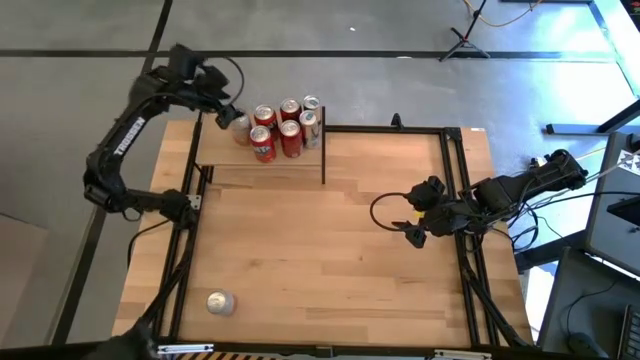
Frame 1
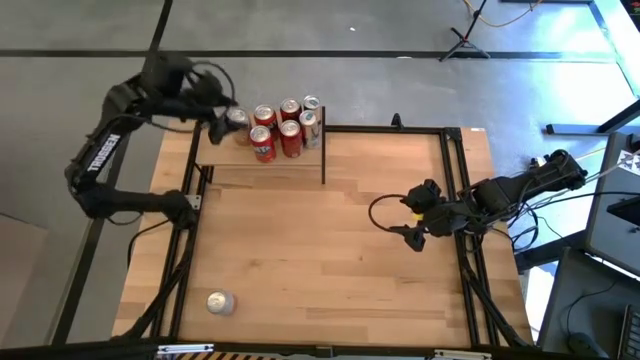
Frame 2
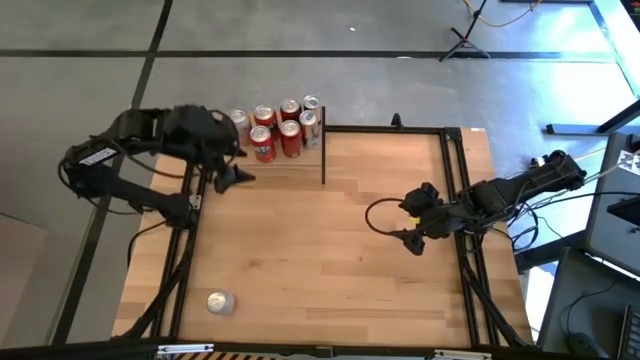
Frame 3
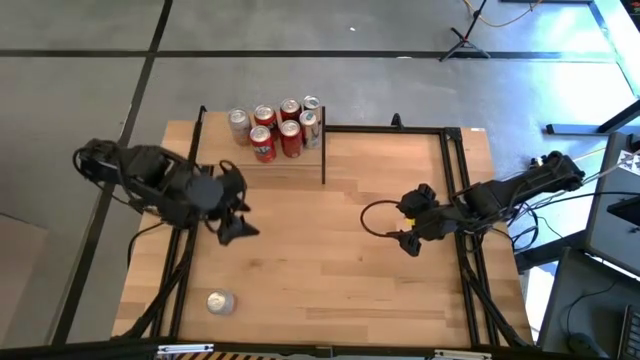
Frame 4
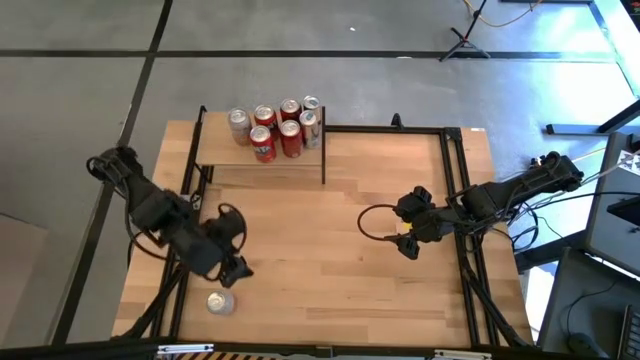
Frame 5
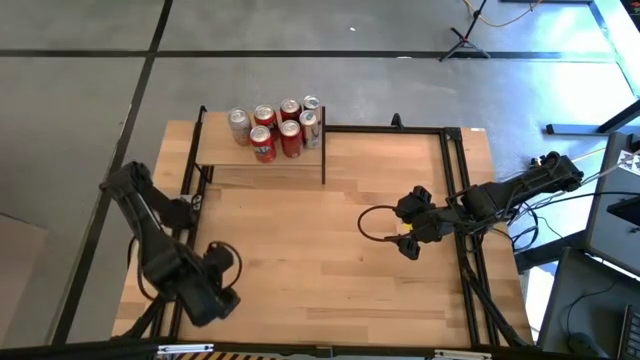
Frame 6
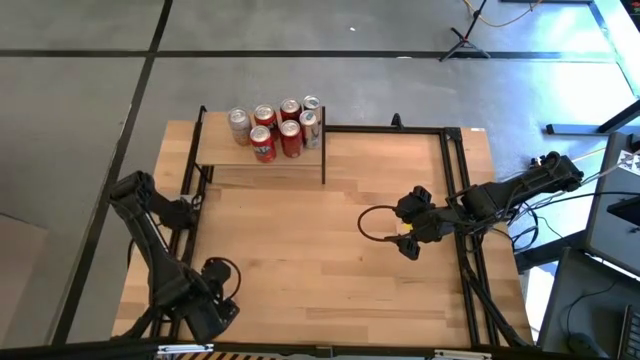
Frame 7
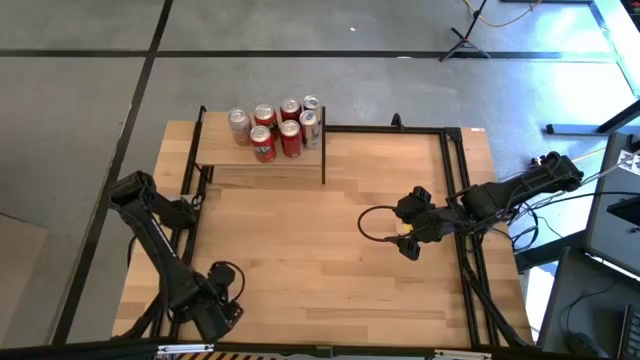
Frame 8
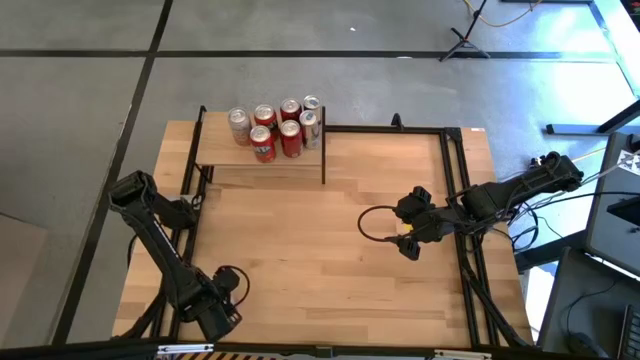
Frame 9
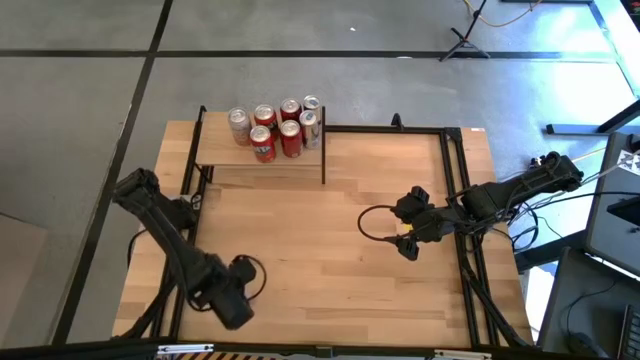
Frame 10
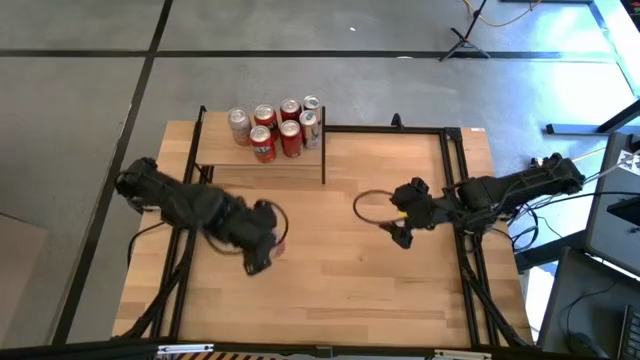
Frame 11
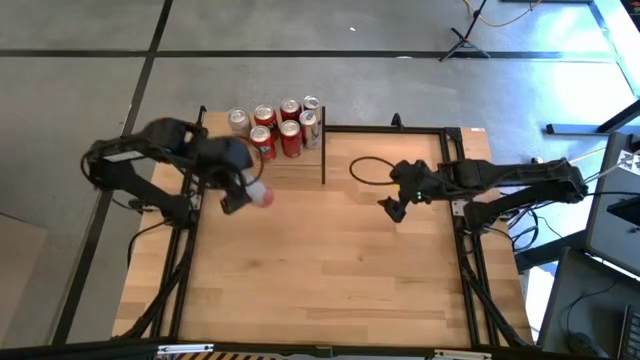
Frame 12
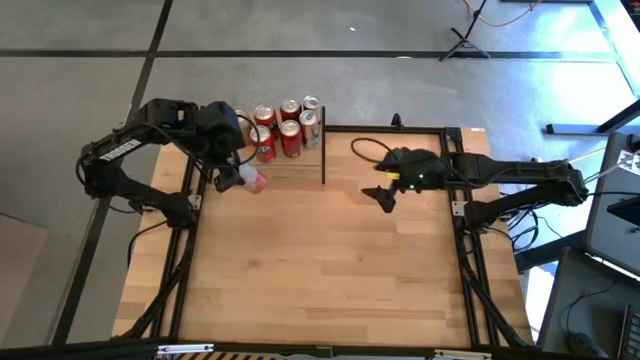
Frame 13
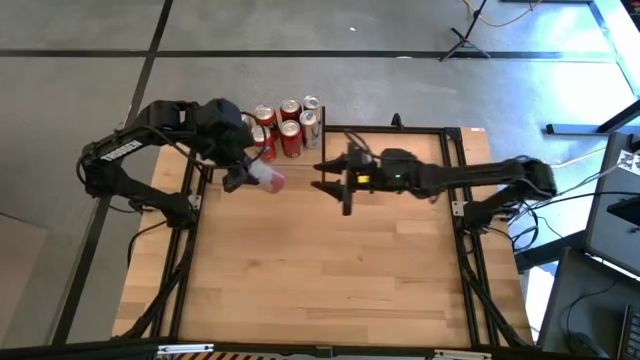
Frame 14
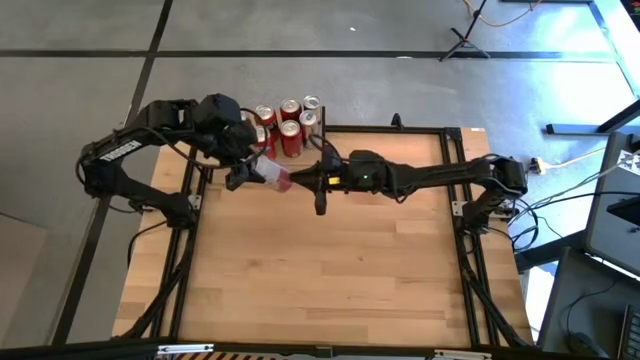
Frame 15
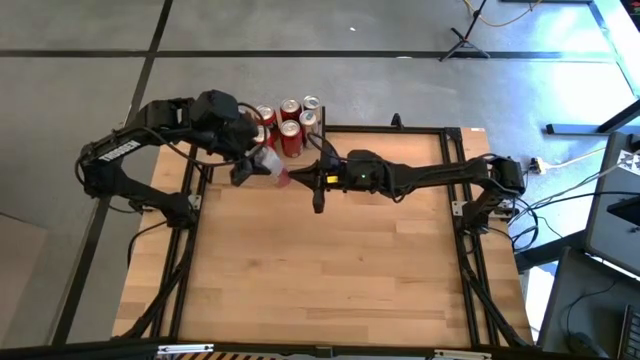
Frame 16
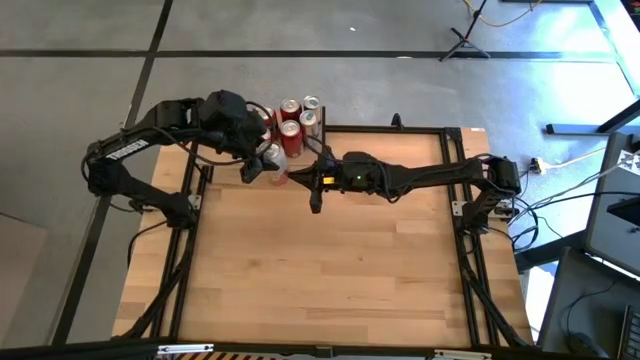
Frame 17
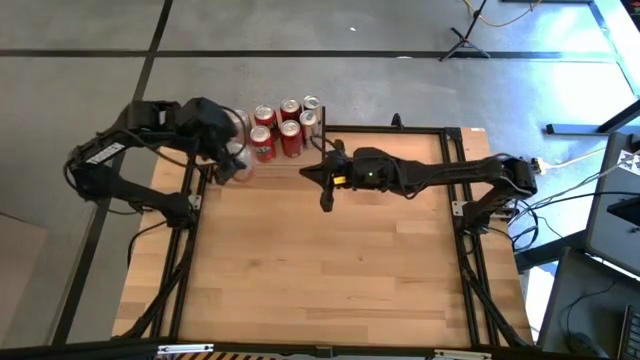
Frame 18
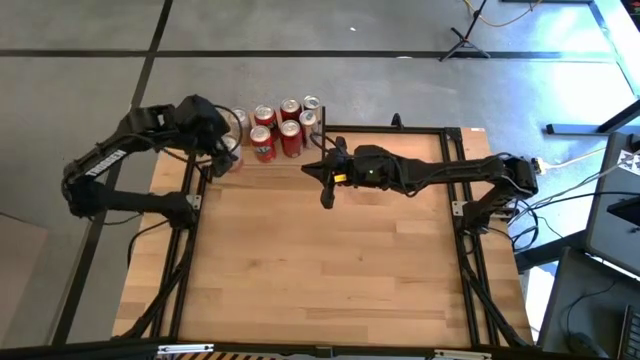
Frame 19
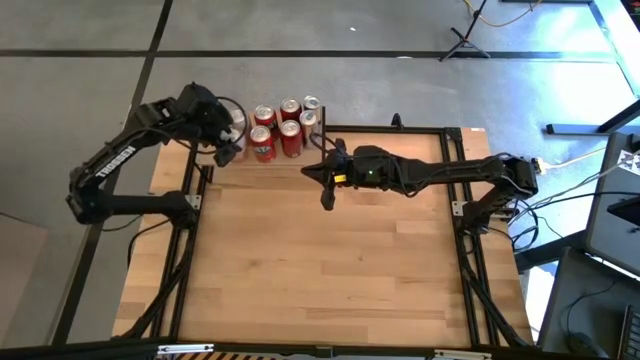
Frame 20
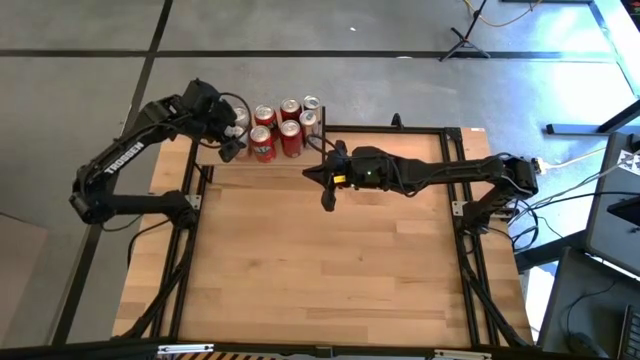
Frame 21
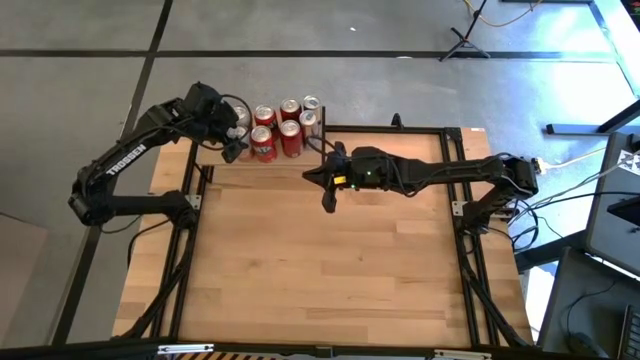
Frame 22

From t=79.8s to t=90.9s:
Task: Place canned beverage on shelf
Put the orange/white soda can on the shelf aligned with the other orange/white soda can

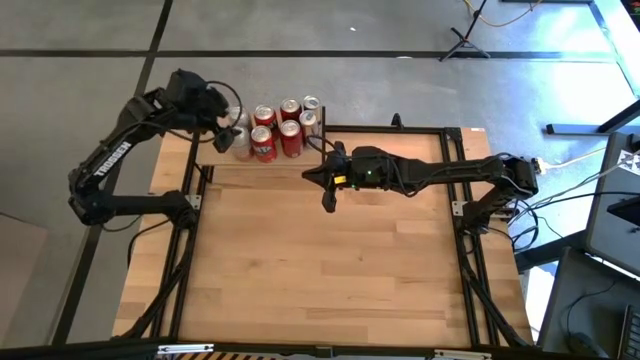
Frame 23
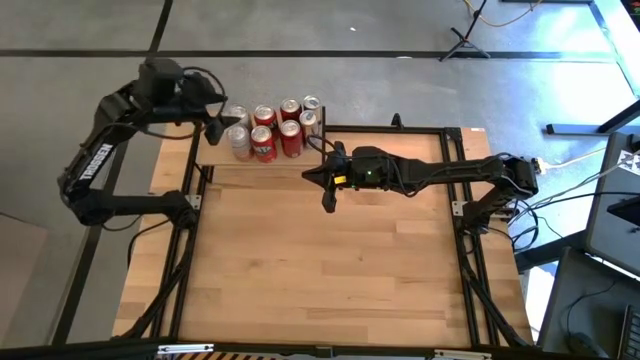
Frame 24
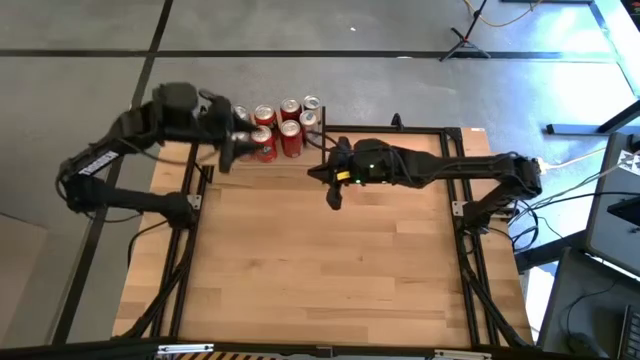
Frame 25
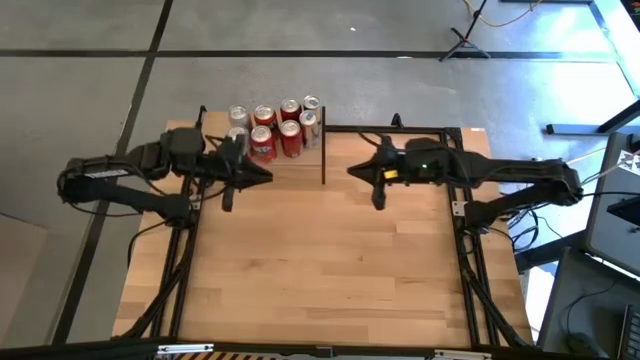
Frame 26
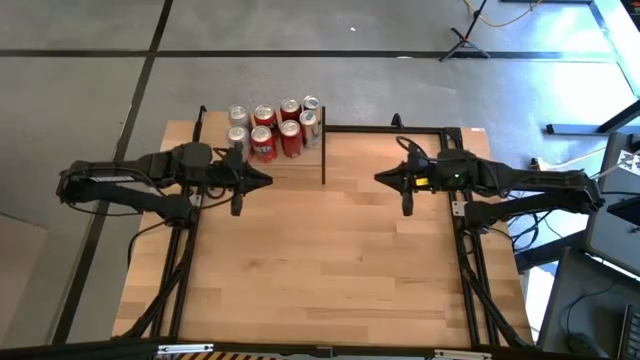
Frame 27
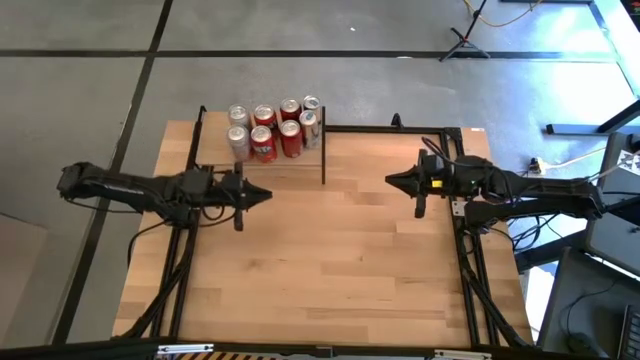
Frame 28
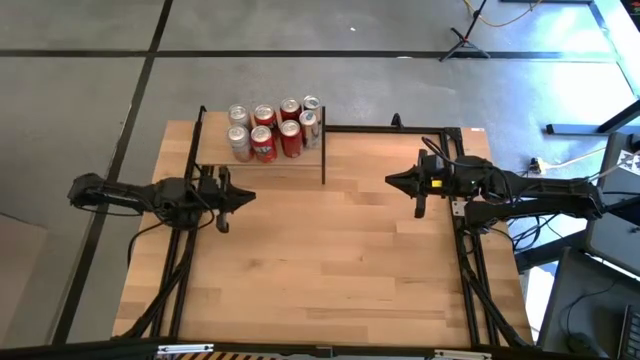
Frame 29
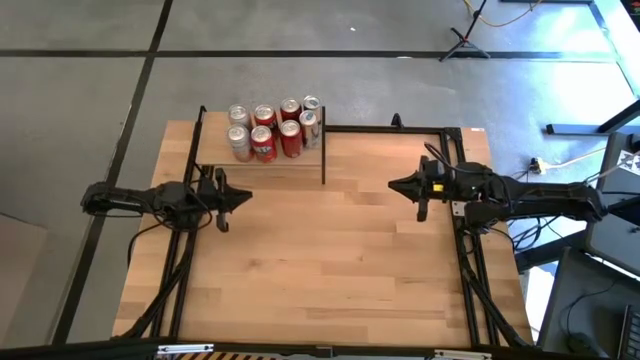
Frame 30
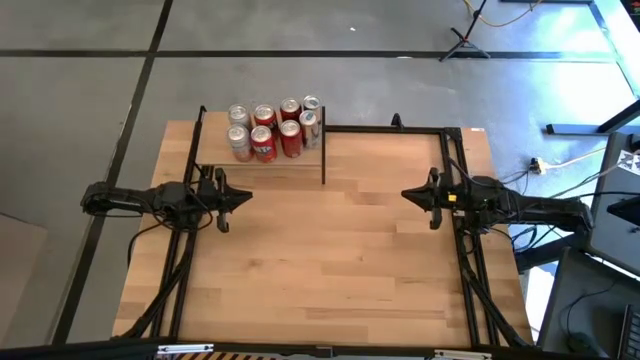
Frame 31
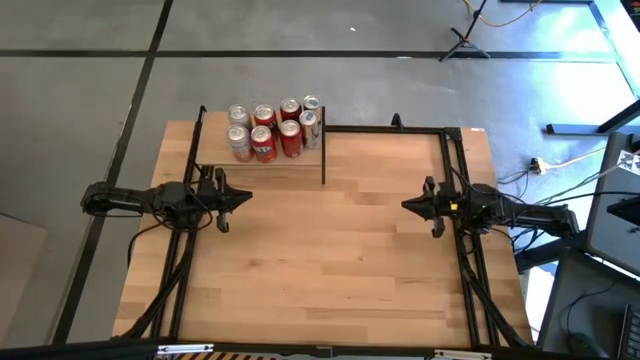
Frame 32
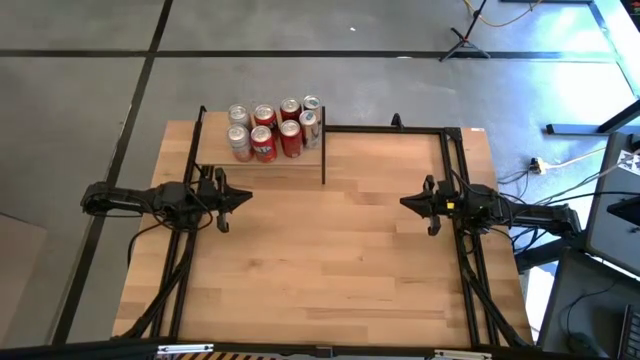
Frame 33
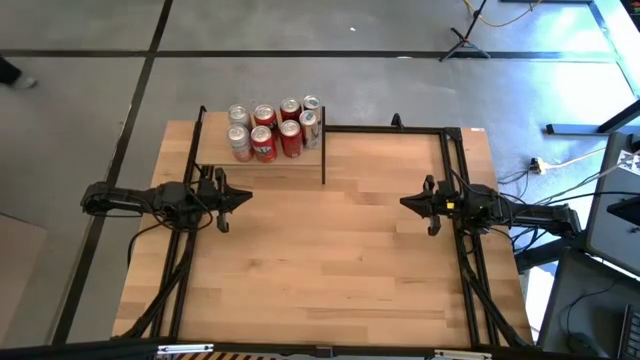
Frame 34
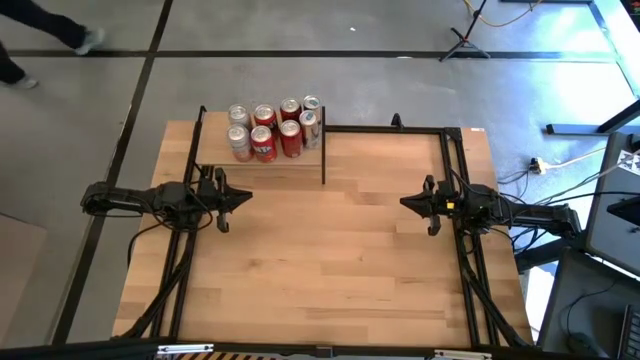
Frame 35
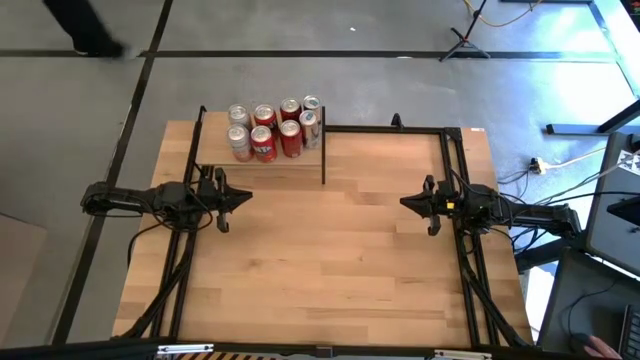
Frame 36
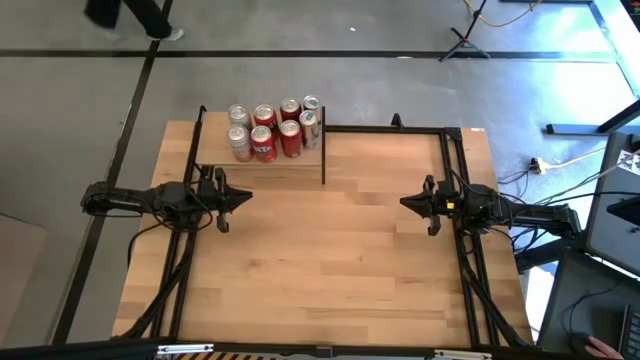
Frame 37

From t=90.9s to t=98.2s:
Return to Home Position

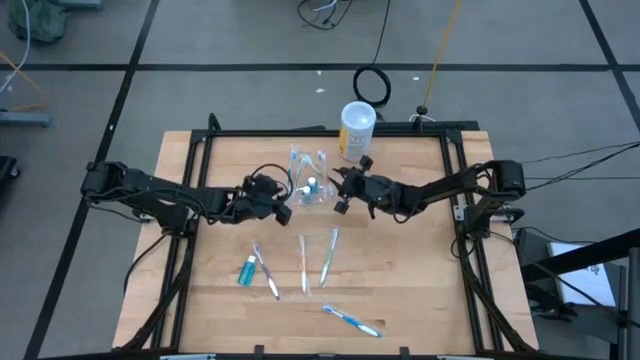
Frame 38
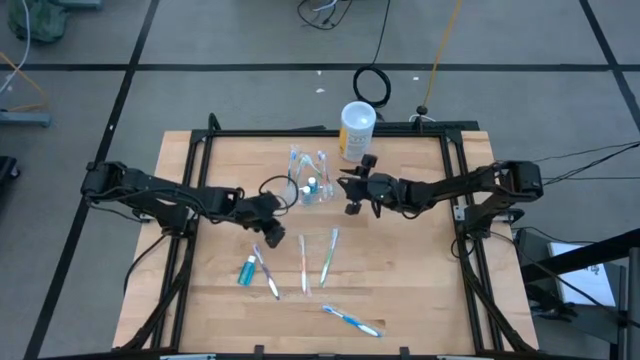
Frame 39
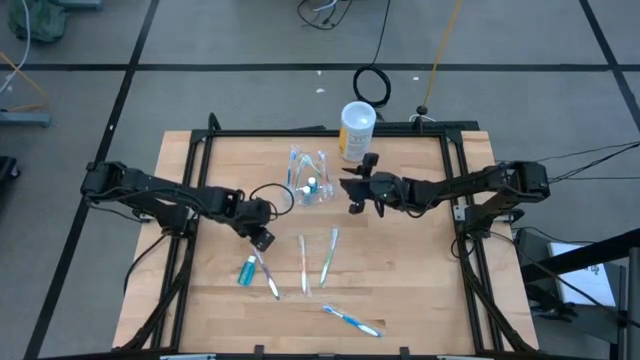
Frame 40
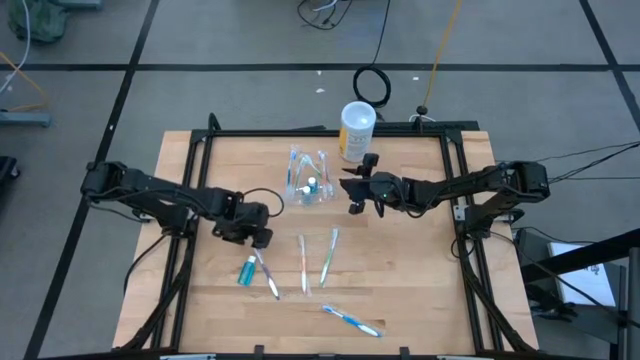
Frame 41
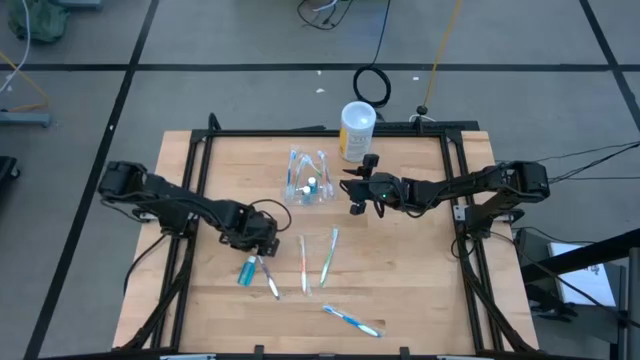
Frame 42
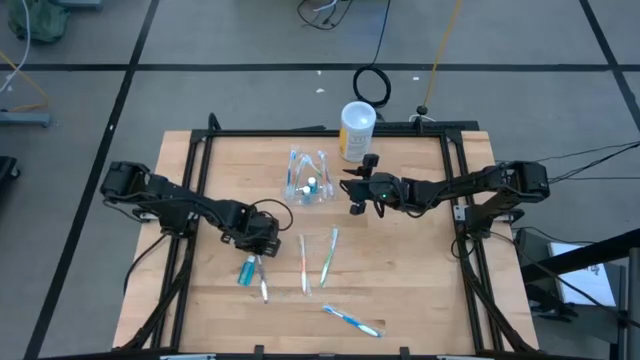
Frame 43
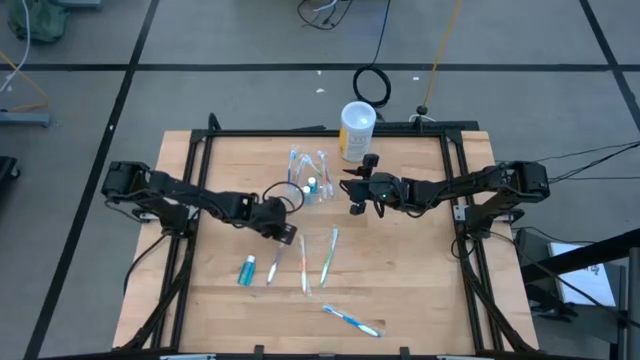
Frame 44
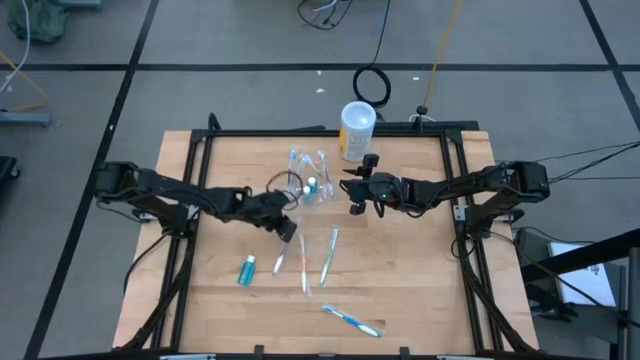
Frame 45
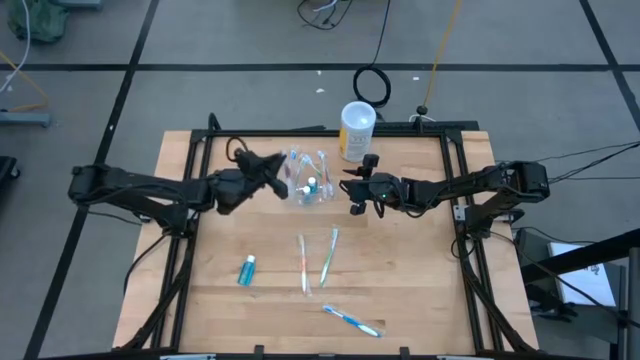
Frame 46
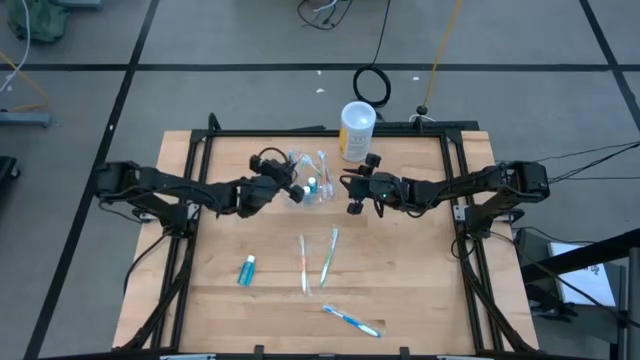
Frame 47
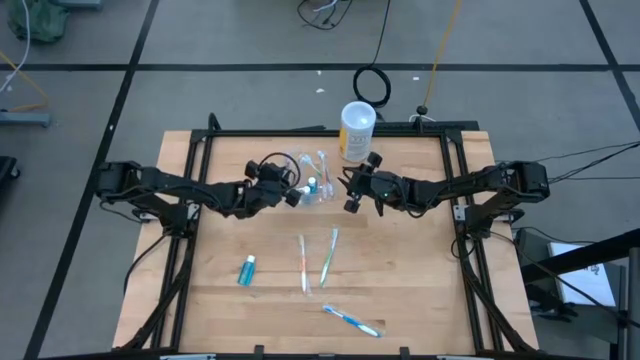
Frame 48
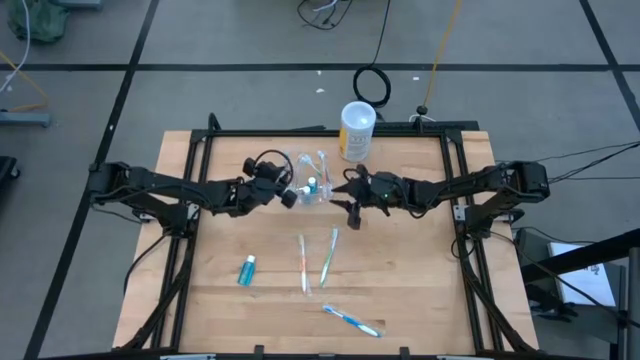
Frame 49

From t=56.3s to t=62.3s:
Task: Pick & Place toothbrushing station
Put the purple toothbrush into the transparent organizer
